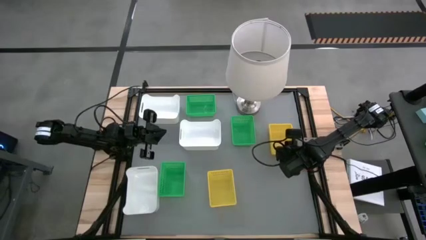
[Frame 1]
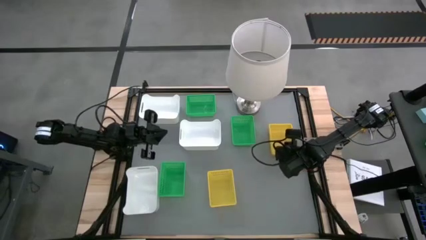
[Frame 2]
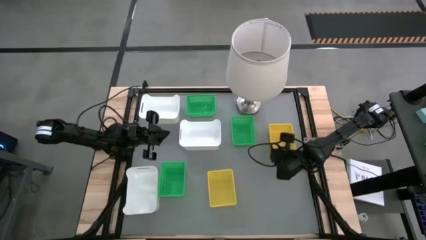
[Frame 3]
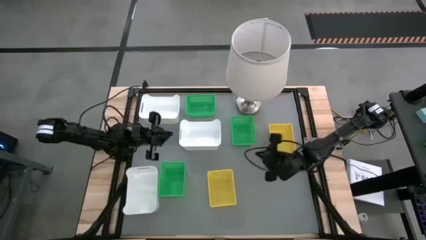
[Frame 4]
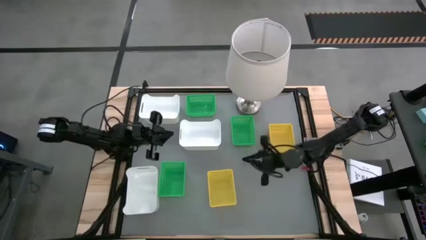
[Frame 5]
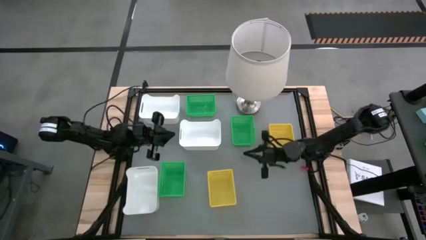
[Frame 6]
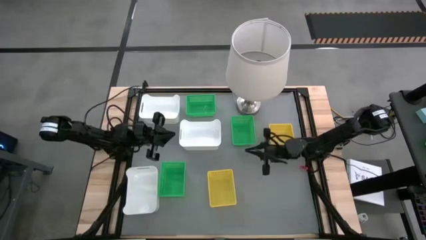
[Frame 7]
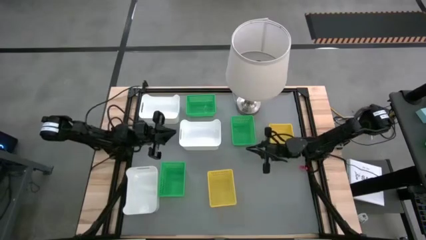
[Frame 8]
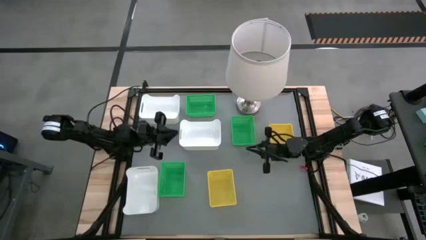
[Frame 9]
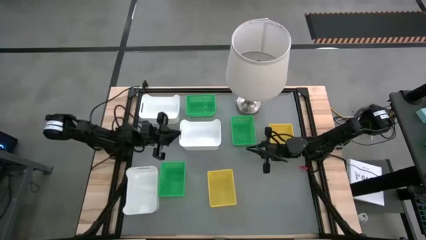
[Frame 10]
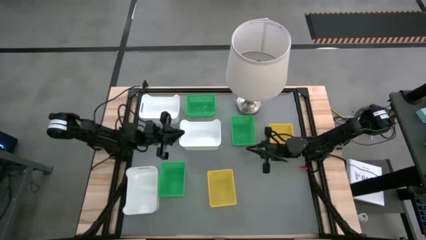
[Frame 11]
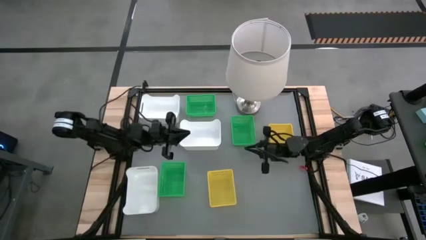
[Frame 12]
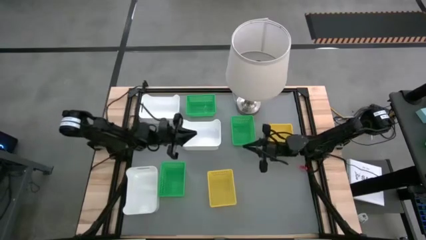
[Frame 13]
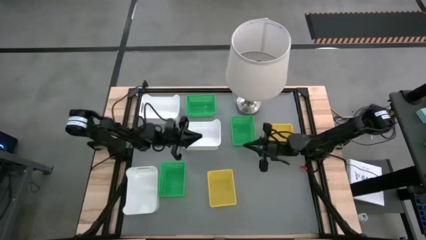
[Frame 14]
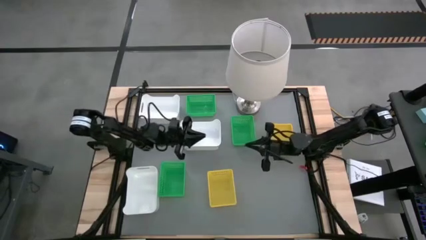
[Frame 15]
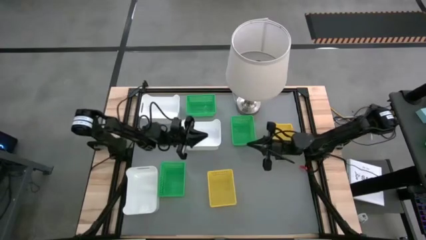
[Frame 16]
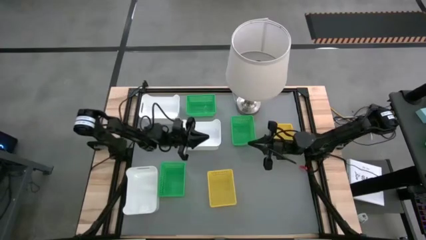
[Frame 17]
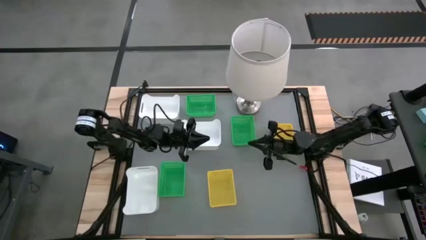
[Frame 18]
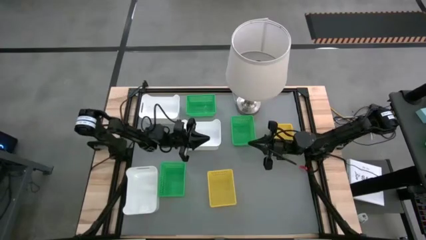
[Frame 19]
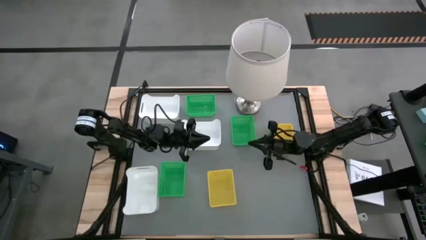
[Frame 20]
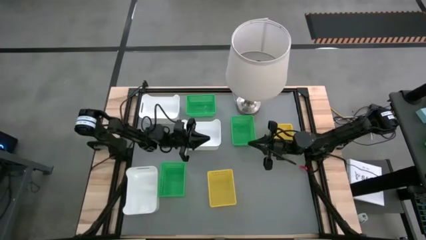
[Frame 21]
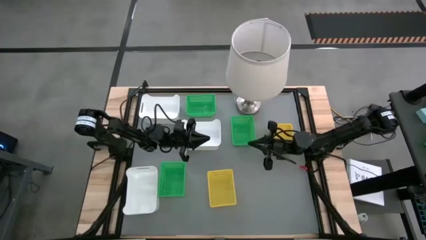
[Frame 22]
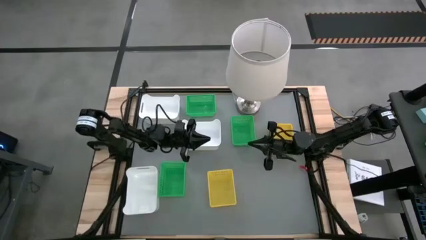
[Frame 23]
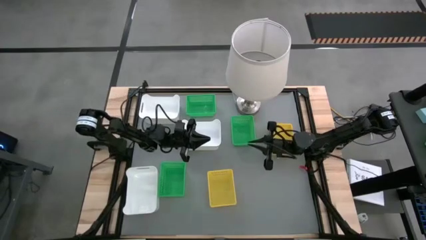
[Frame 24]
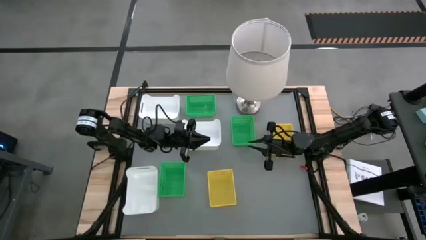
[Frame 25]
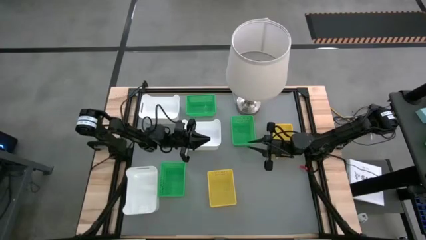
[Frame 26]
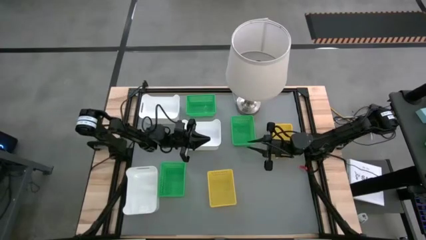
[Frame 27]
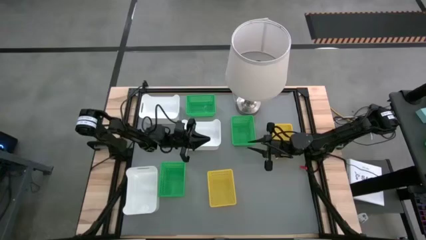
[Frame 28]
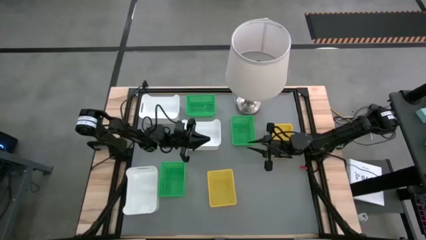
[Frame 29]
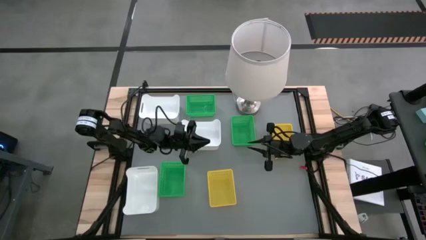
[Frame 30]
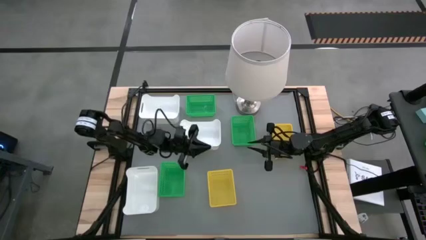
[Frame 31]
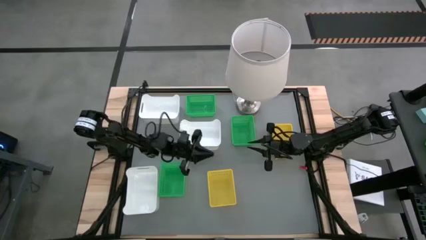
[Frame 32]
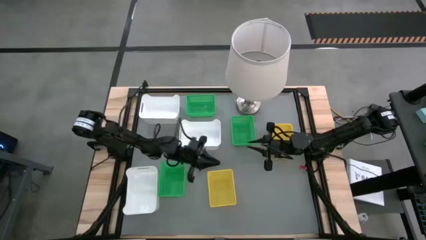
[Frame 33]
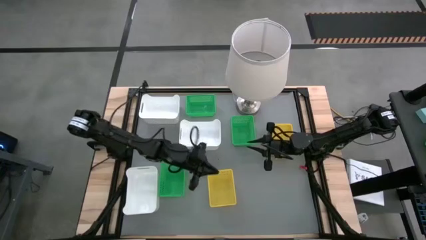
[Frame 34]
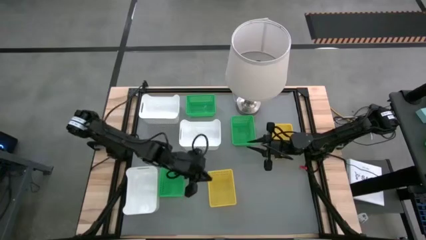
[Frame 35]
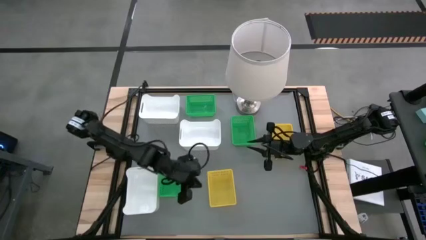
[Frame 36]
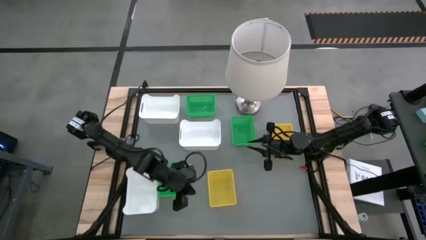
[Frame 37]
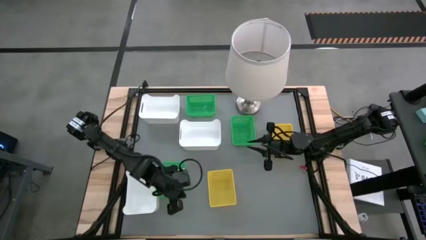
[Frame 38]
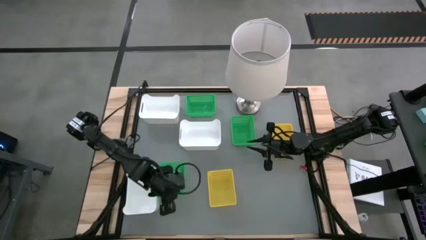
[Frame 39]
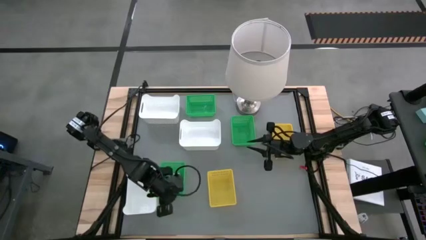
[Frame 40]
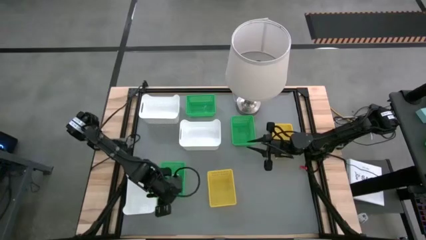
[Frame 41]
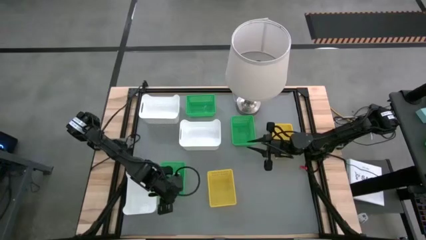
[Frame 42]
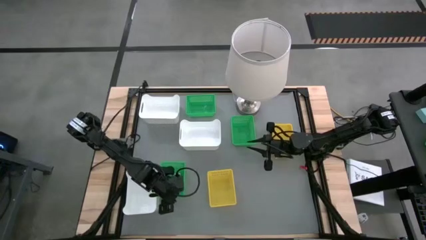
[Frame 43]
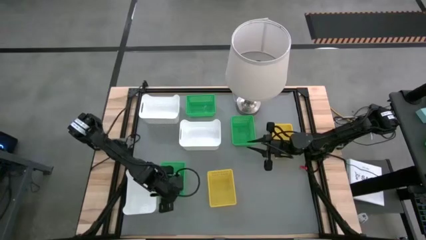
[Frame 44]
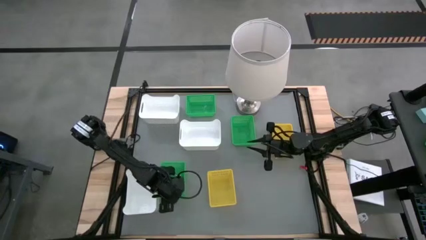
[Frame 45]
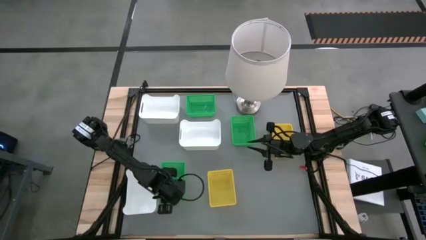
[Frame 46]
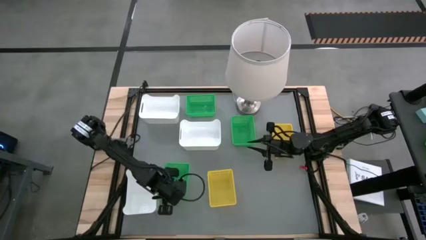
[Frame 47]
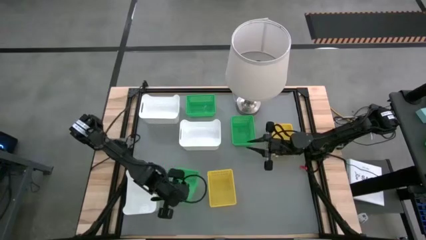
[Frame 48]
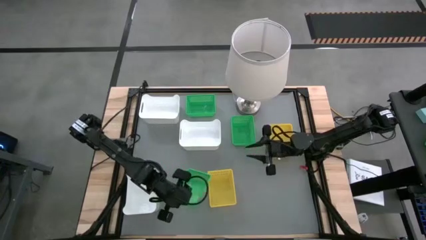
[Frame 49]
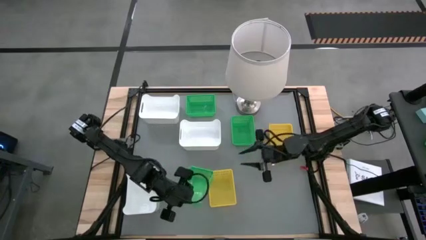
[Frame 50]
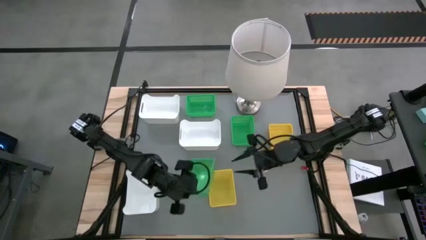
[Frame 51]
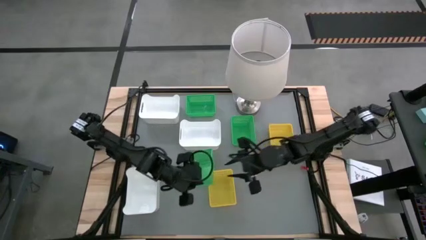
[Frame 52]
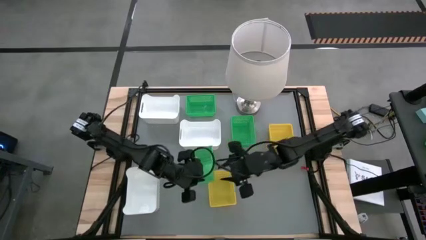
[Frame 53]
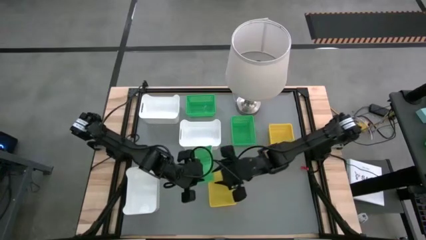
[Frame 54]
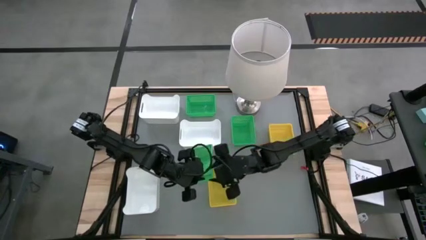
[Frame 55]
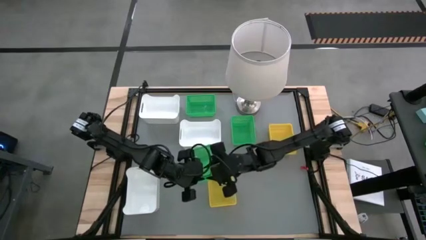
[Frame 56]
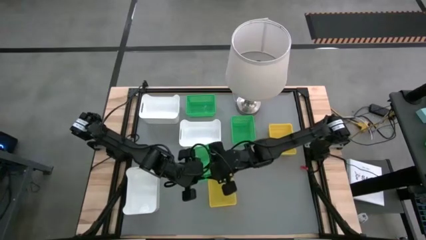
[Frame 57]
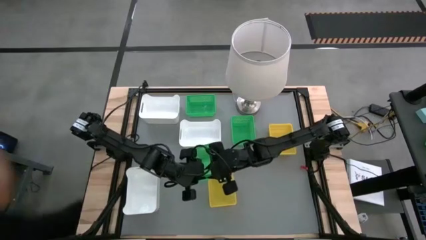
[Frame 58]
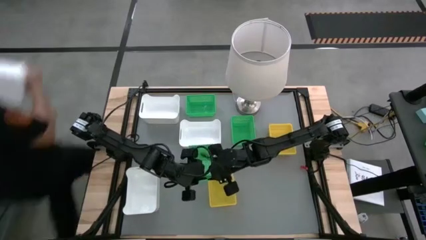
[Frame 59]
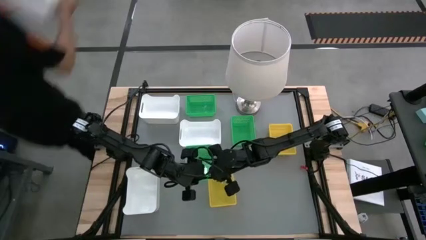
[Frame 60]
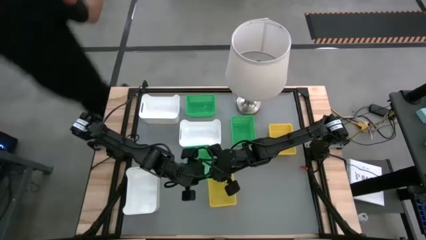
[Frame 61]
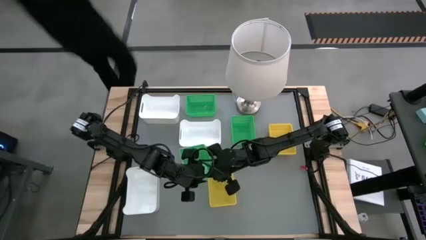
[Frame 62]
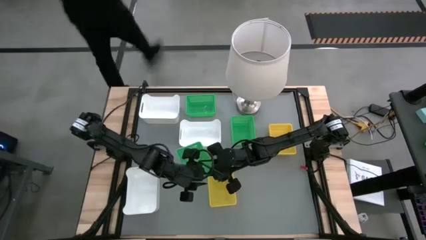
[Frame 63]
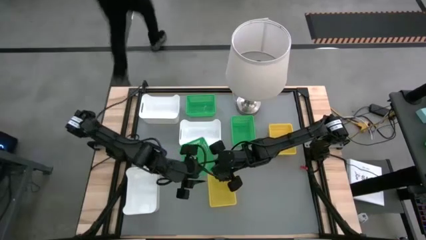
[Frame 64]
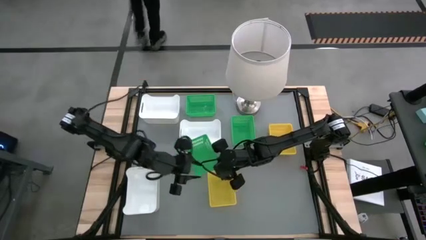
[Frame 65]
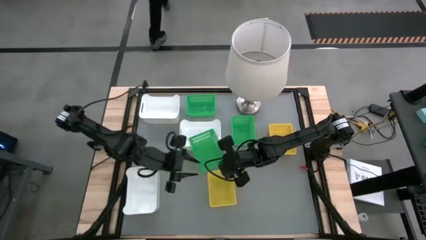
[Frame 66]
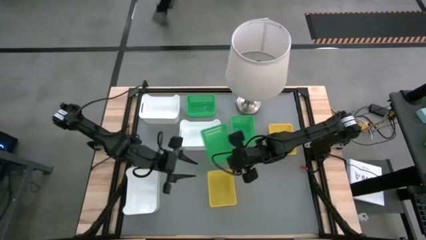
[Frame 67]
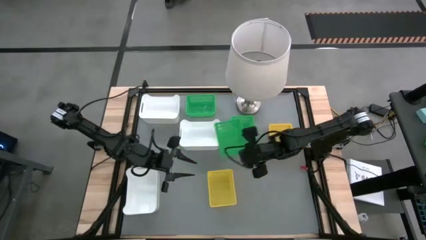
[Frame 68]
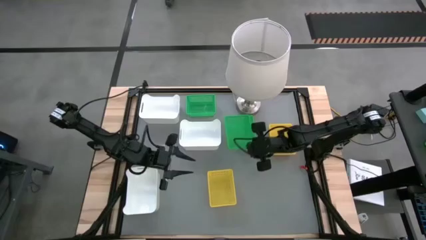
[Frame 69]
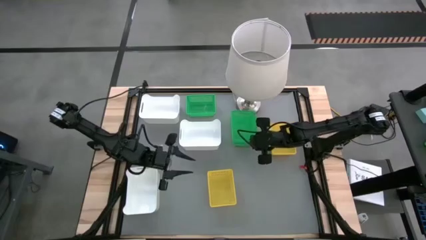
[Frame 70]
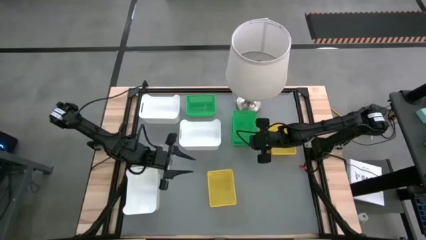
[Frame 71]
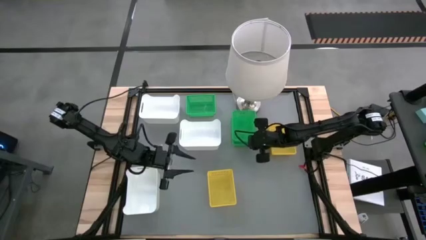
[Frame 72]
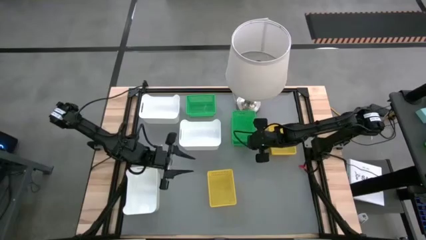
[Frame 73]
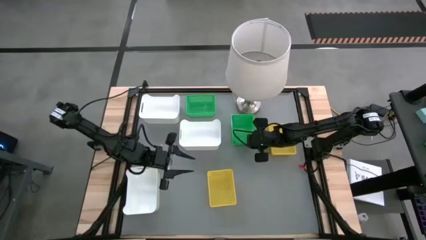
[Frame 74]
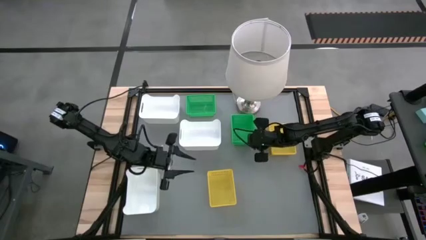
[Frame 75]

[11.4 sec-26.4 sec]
Stack the bottom green bin on the middle green bin
